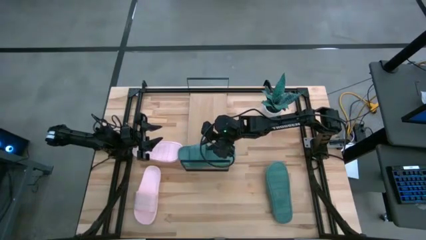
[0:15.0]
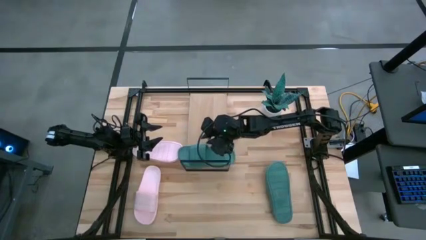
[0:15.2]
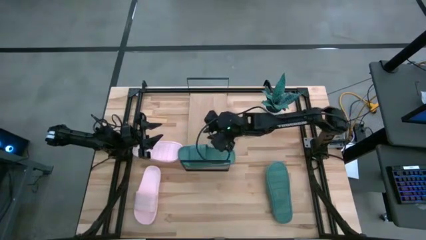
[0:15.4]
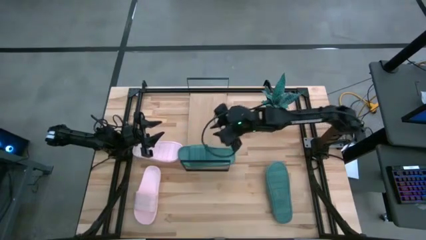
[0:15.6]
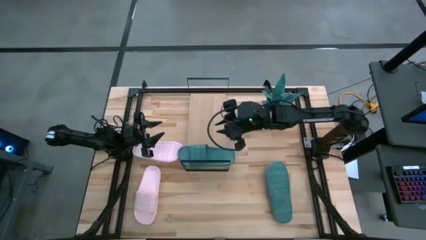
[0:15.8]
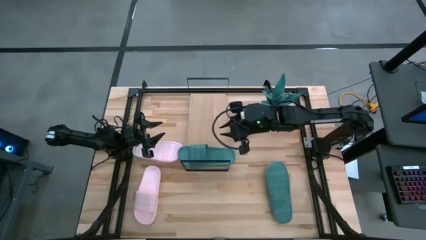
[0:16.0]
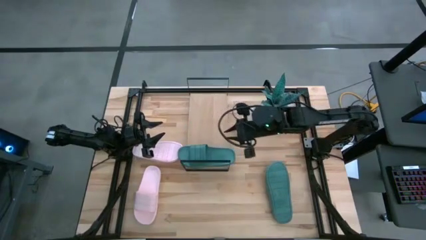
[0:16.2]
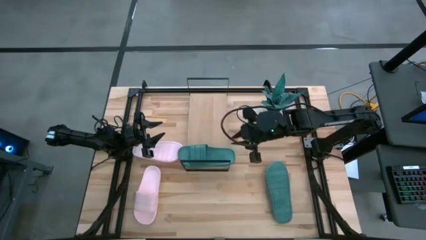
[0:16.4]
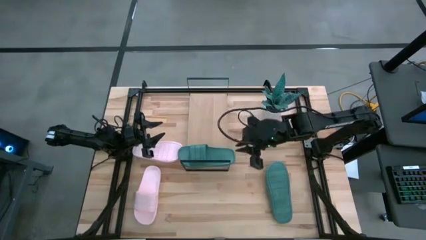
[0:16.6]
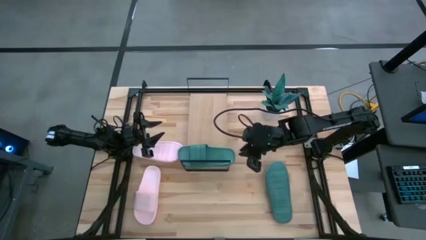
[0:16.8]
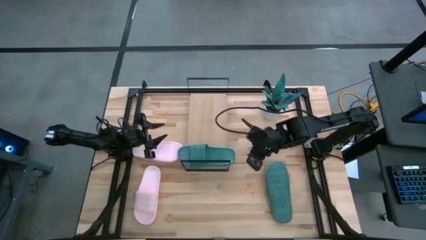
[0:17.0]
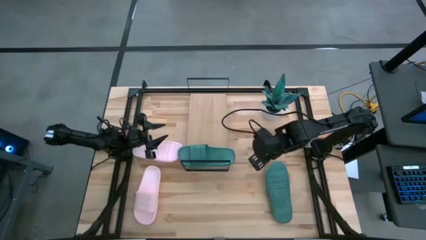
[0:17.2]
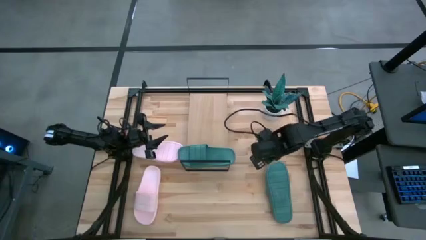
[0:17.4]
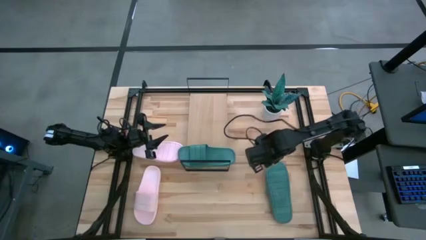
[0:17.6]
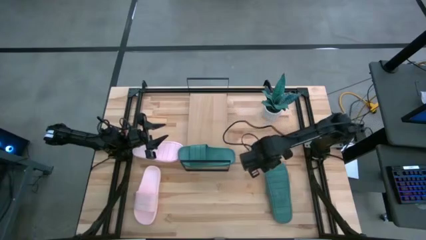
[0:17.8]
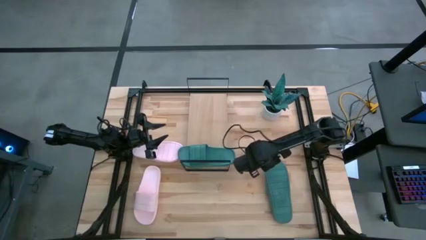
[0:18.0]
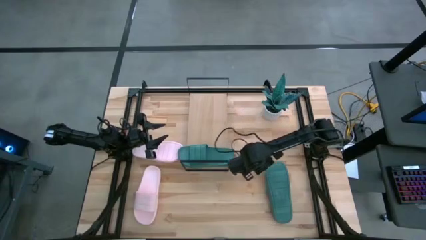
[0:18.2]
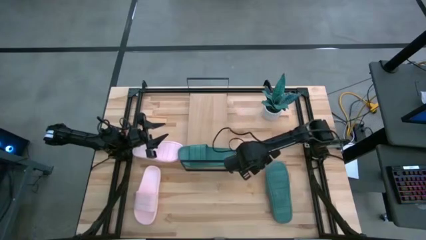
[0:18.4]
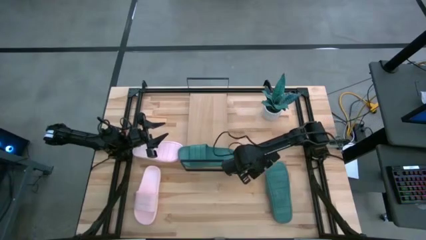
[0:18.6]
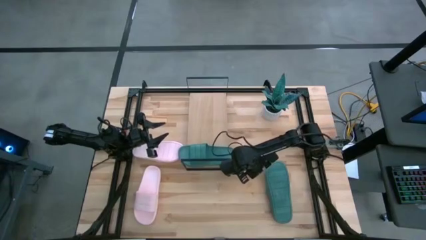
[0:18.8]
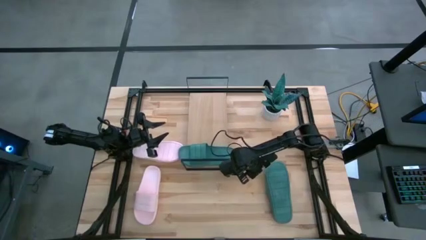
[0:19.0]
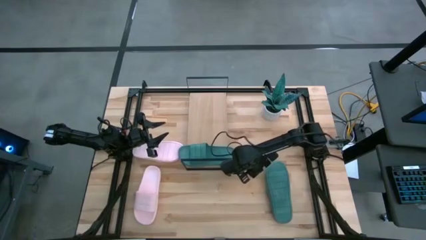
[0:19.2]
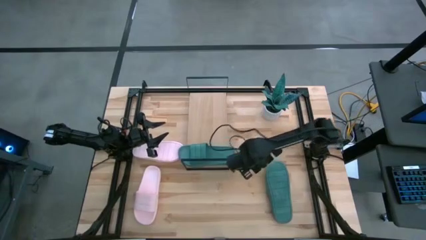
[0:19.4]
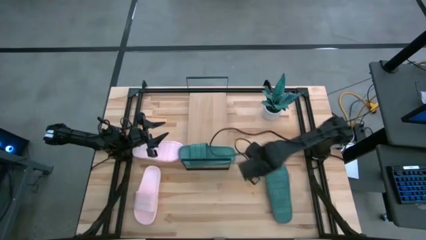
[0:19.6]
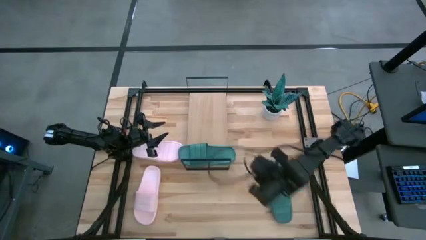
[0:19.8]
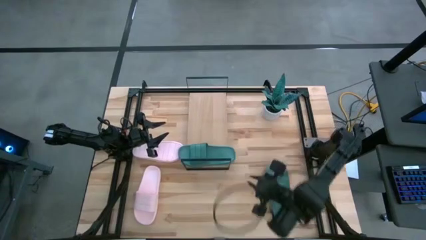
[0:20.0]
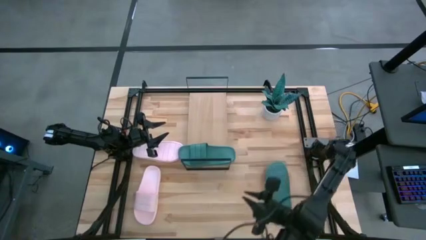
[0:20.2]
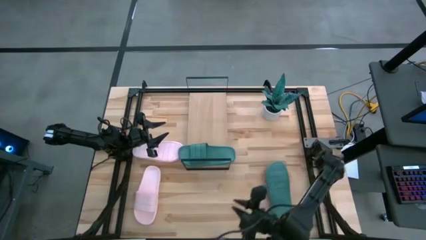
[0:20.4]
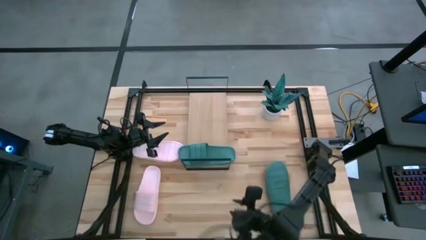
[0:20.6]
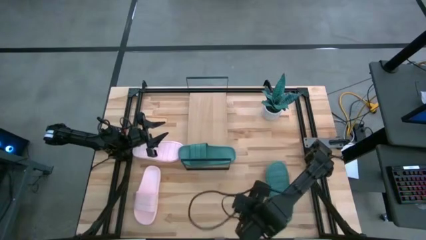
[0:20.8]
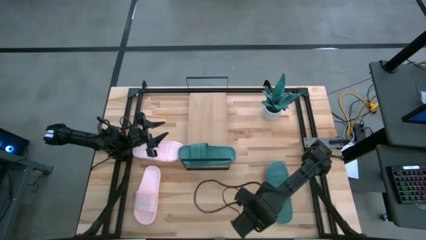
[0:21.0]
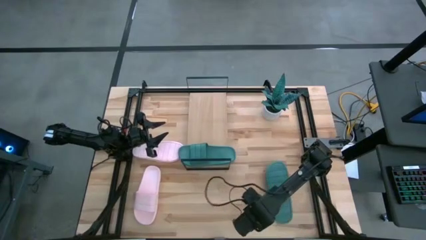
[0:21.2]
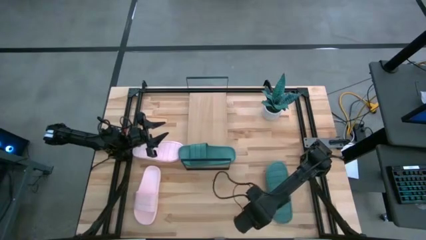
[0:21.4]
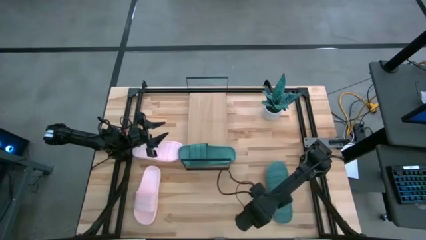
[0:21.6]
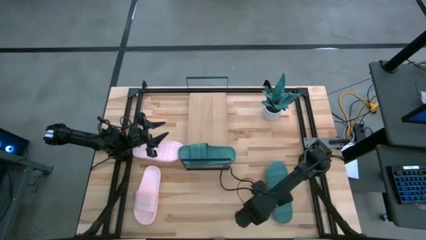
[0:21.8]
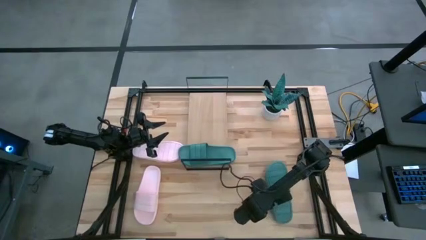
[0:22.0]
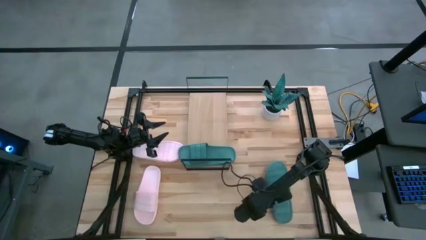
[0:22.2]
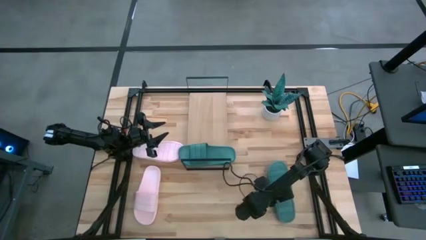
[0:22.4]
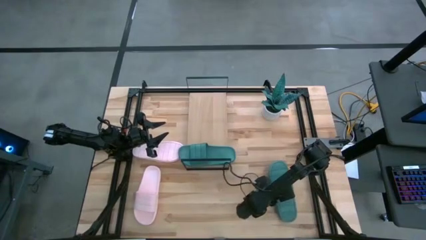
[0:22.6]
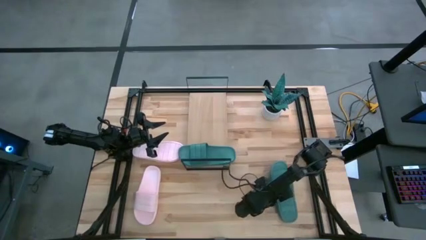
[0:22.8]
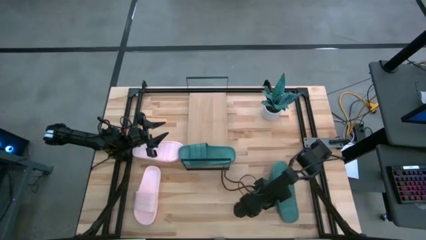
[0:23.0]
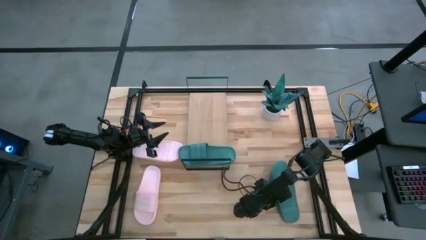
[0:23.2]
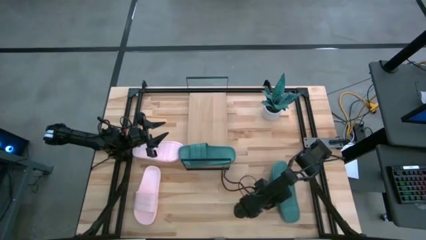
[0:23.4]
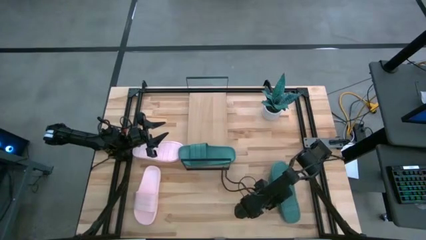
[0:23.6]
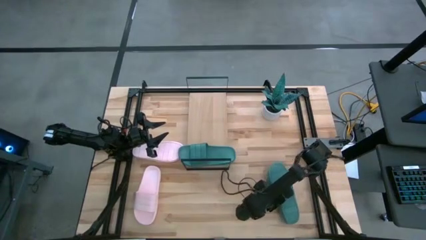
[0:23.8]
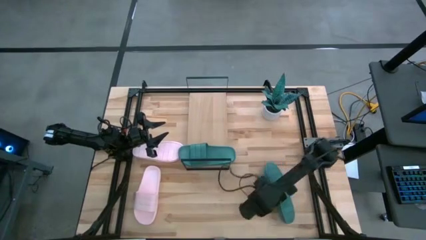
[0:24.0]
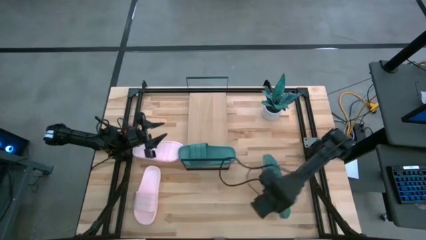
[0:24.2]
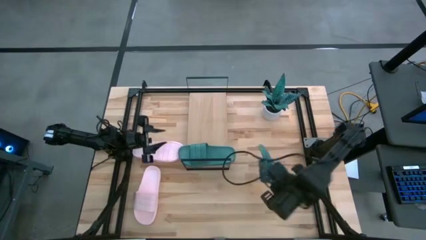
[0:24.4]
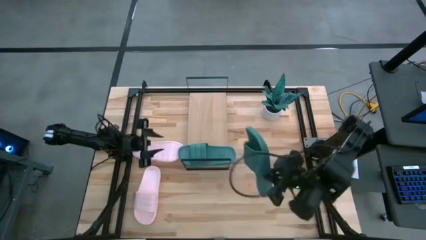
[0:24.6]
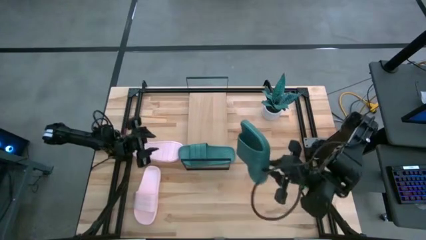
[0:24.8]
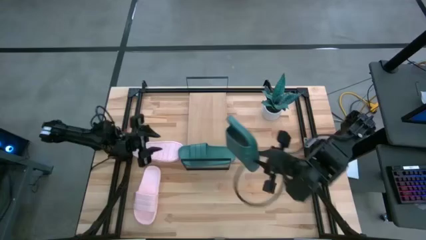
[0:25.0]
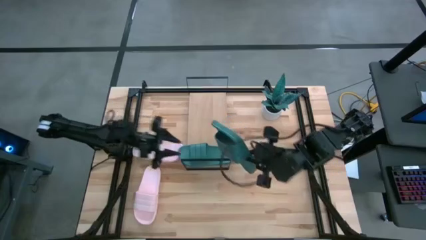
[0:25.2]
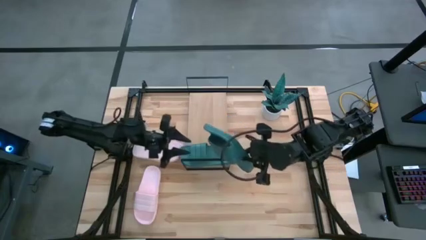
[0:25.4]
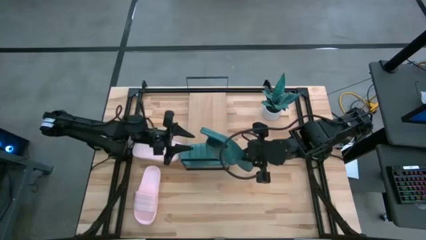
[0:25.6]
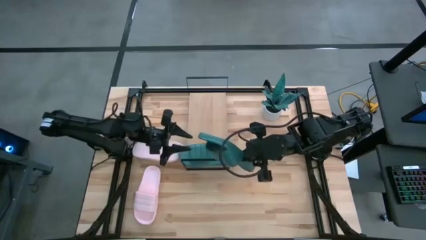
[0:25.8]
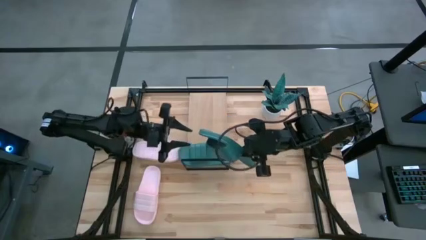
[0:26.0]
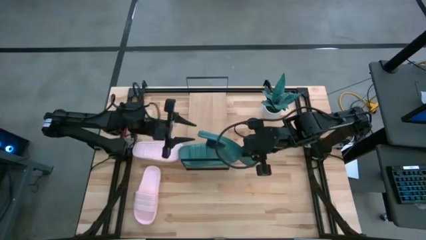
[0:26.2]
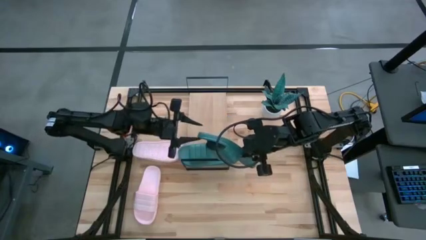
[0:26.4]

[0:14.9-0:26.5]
Task: Pick and place slides into the shelf
Put the green slipper on the shelf

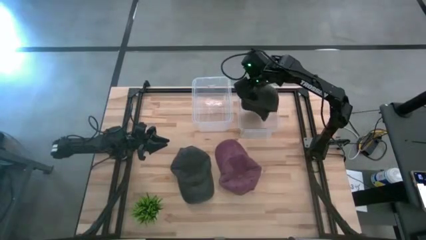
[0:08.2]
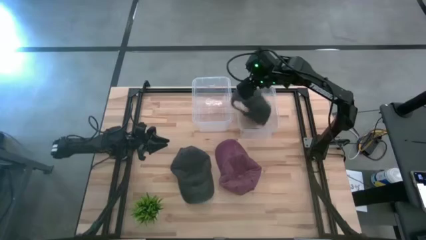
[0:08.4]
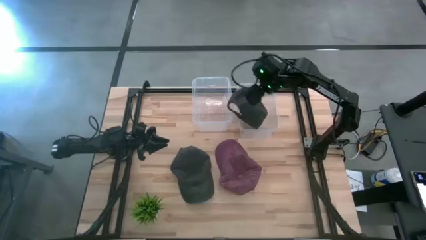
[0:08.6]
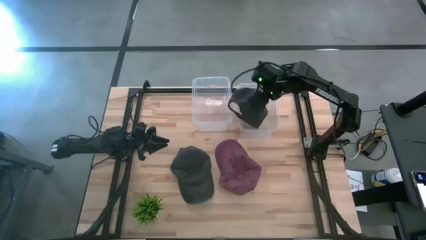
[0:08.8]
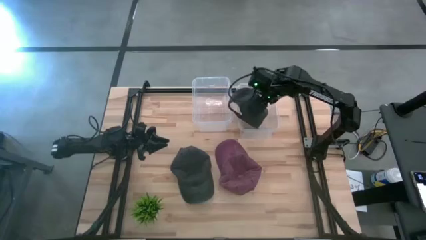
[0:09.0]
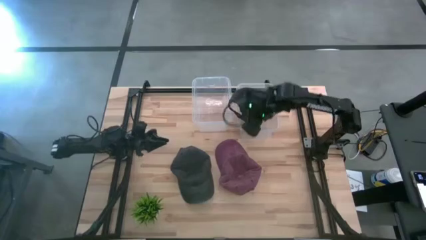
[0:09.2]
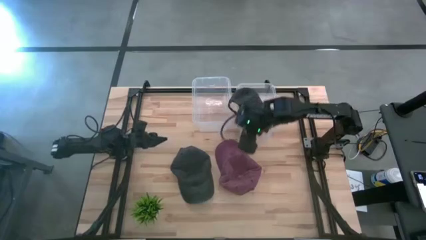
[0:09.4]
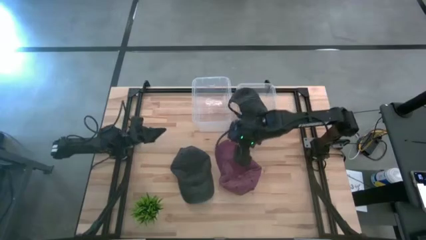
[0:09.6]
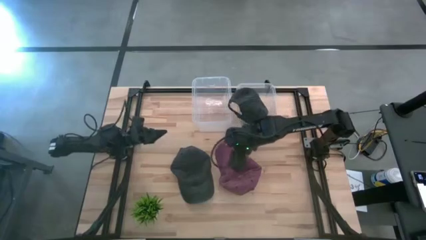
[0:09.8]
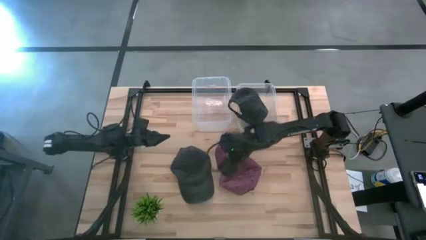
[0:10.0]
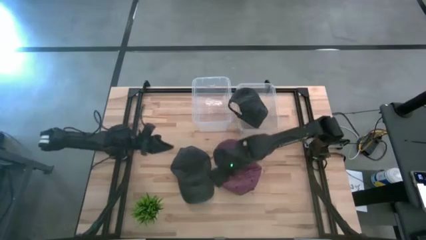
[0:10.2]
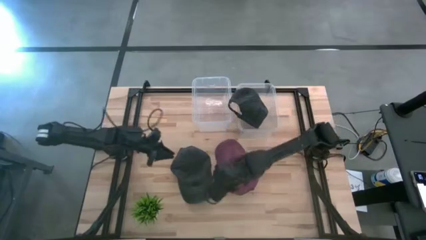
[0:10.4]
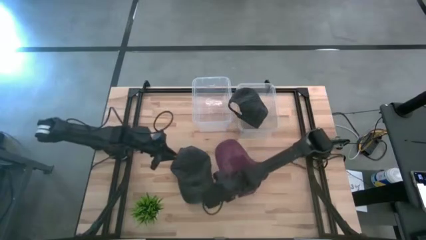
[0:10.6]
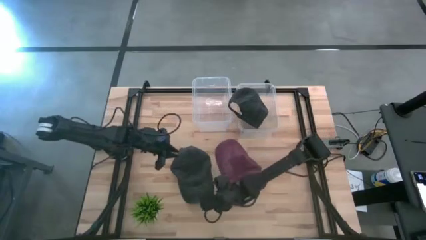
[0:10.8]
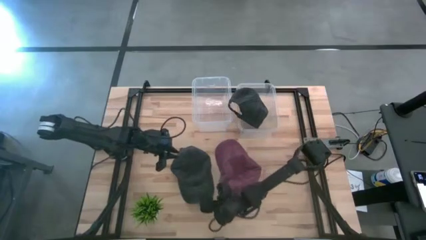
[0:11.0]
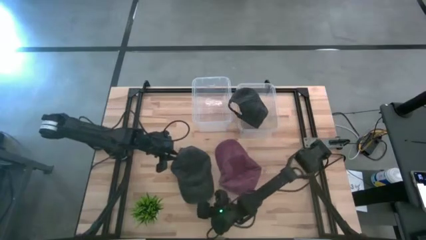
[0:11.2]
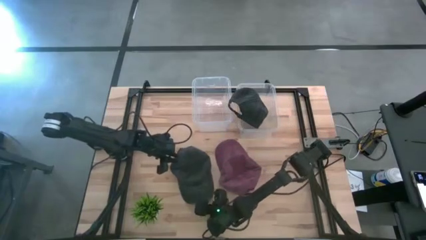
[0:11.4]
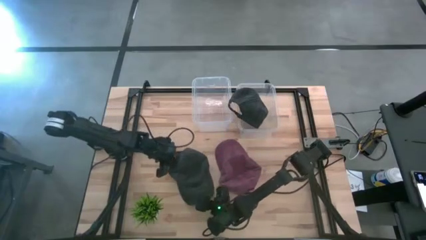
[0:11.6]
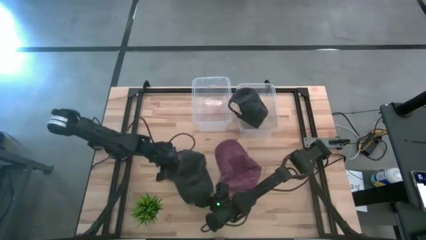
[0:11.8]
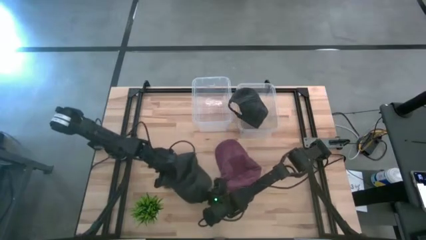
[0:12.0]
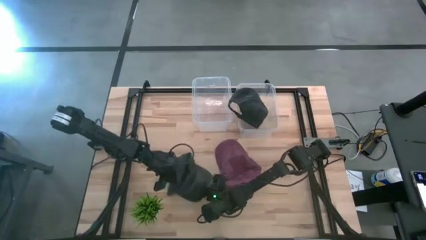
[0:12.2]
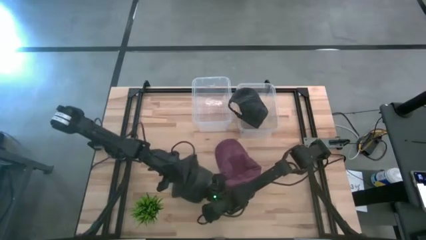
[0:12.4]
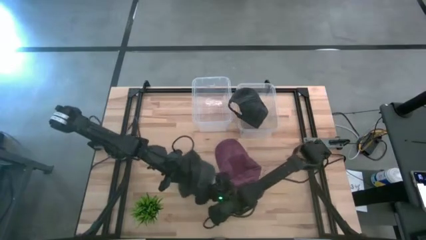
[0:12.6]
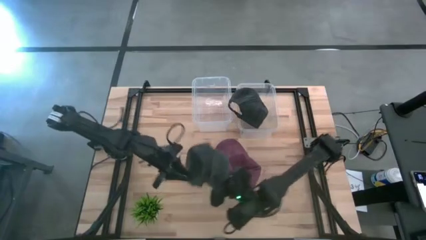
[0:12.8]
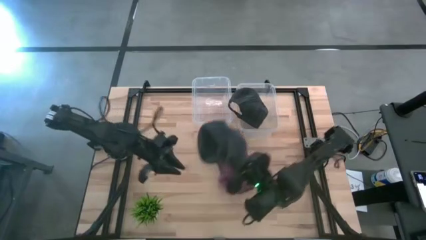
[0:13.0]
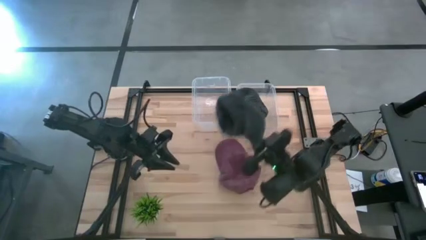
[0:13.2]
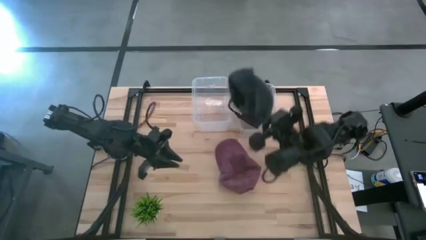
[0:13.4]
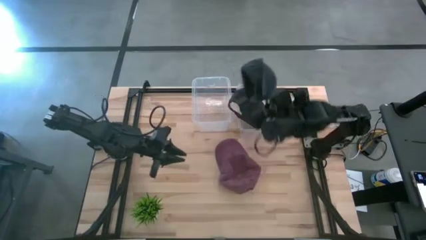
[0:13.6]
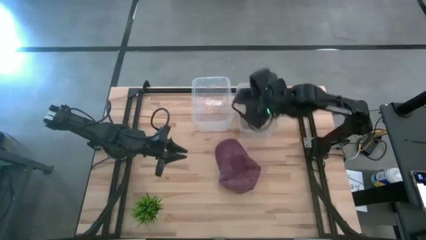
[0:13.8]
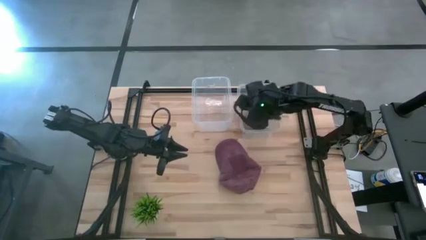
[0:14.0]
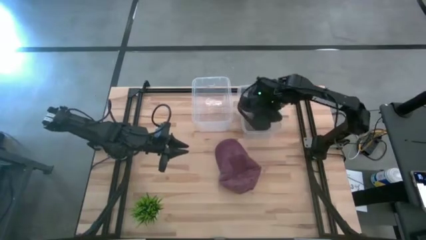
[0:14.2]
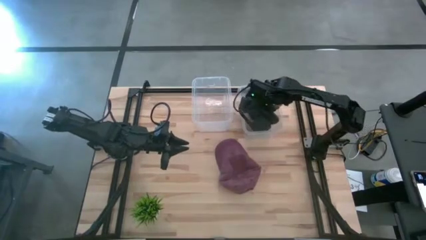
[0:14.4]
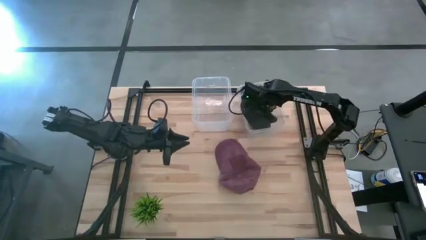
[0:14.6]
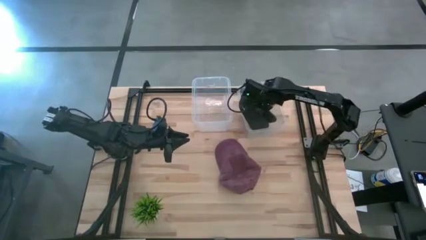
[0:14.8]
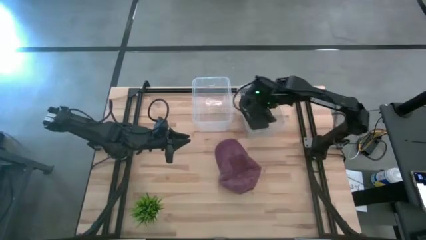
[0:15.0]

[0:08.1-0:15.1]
Task: Pick & Place hat
Put the black cap into the right transparent bin
